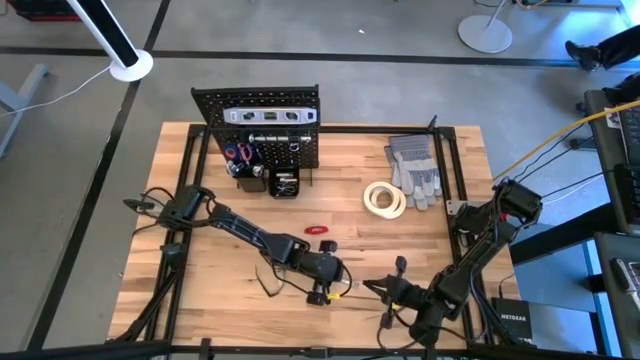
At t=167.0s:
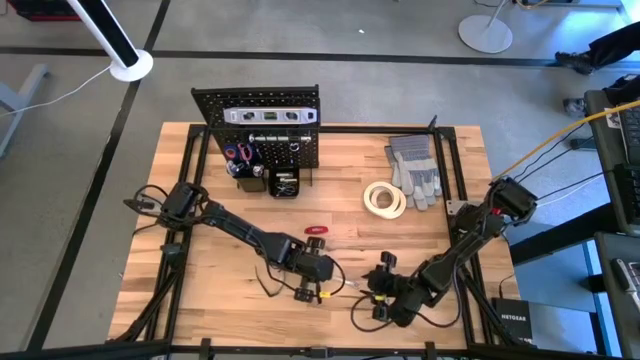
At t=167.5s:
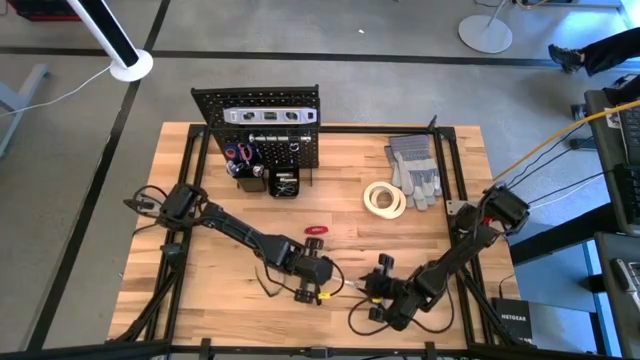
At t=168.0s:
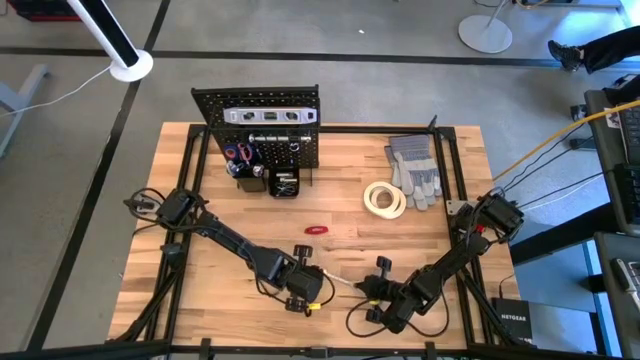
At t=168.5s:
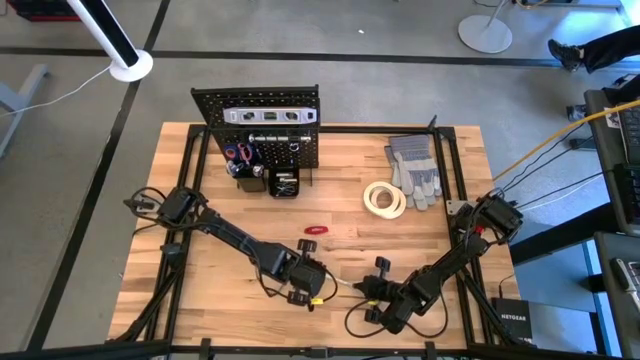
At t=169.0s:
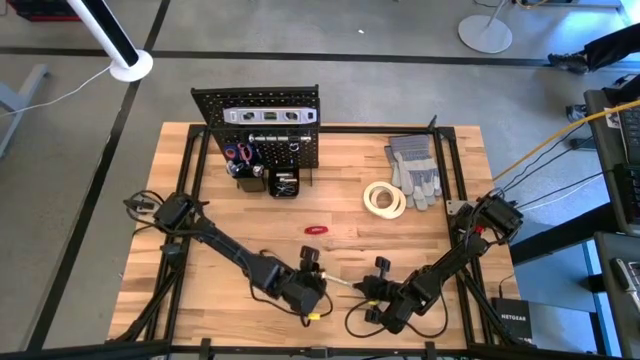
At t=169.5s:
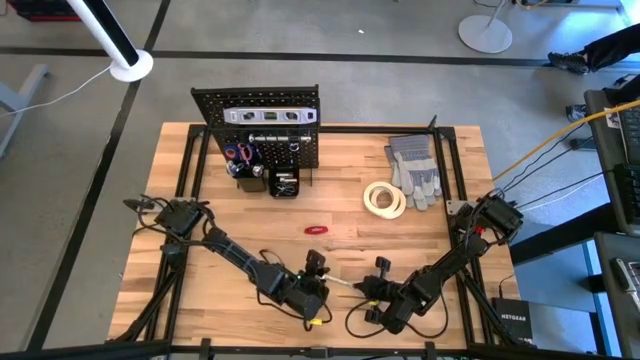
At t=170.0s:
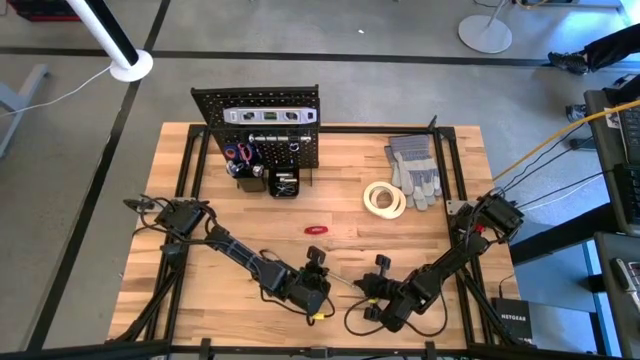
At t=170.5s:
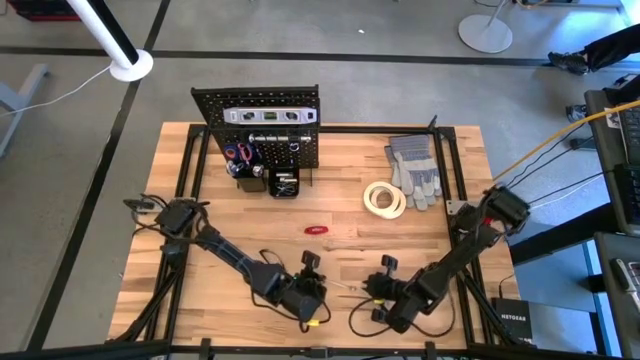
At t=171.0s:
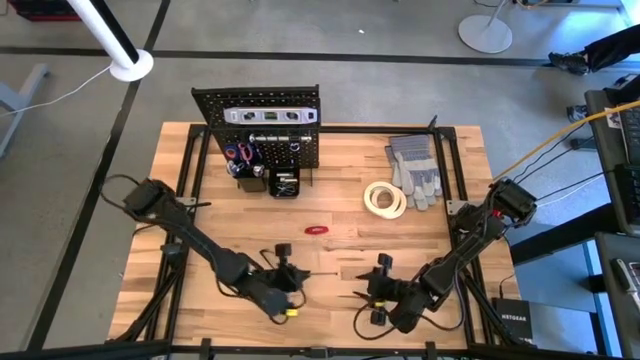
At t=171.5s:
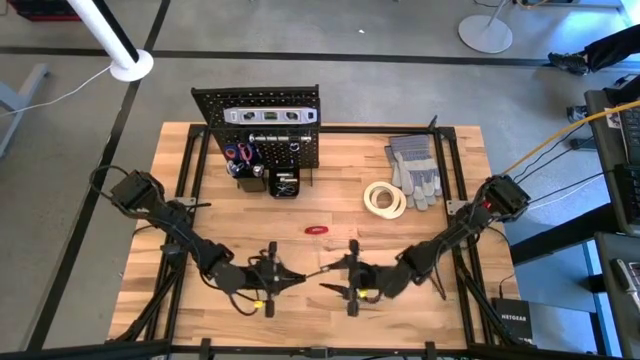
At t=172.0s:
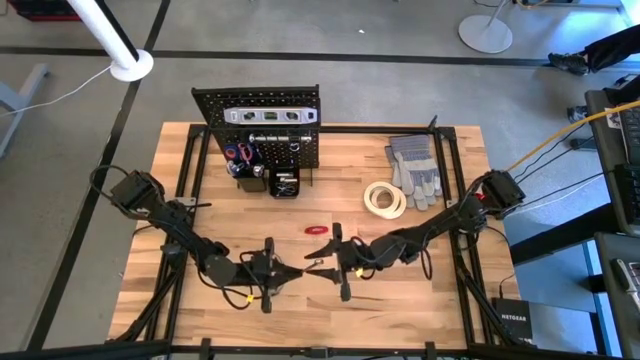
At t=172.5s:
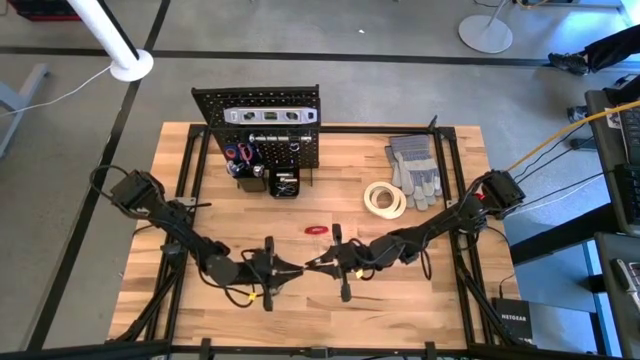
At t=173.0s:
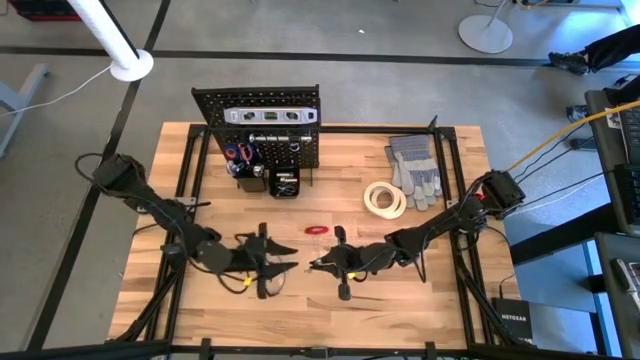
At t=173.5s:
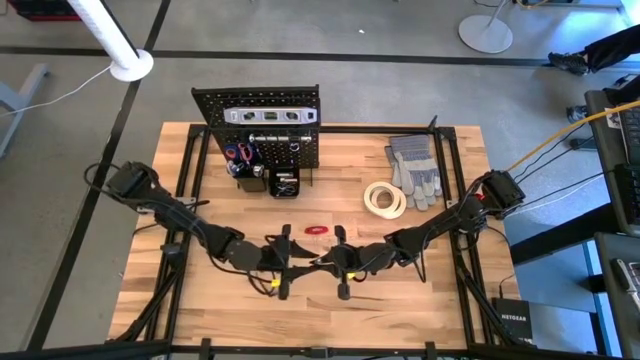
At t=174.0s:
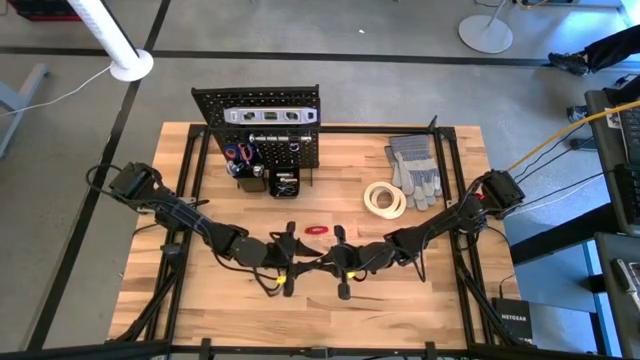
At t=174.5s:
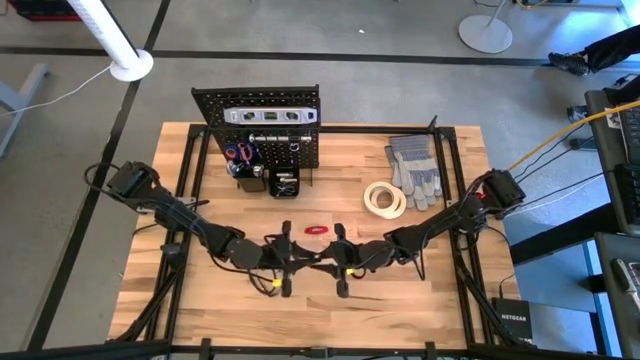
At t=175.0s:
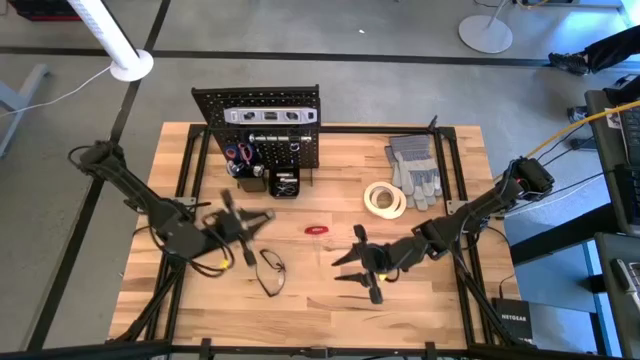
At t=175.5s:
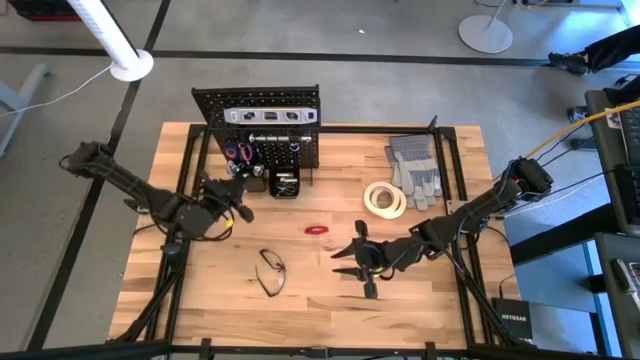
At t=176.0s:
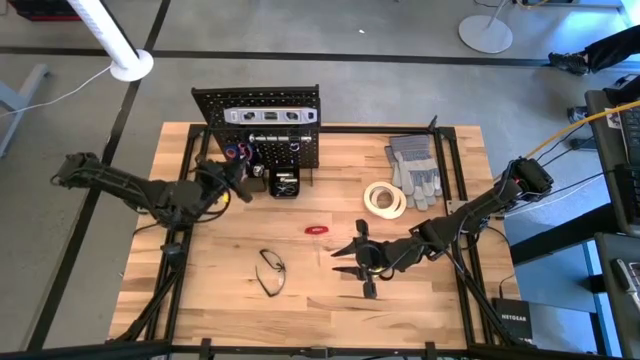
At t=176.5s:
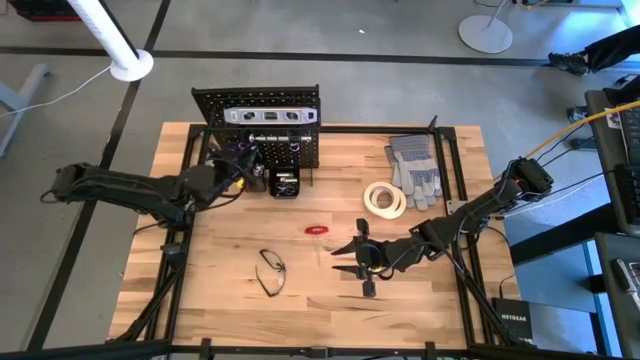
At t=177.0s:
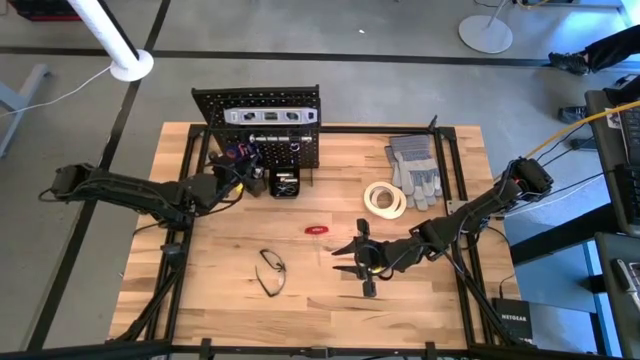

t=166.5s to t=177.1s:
Task: Hang tools onto peg board
Put the wrench into the left pegboard organizer bin

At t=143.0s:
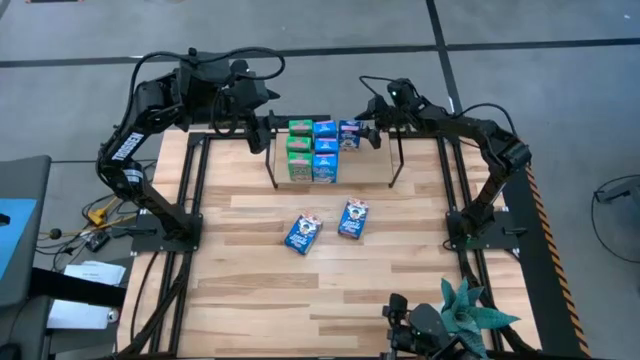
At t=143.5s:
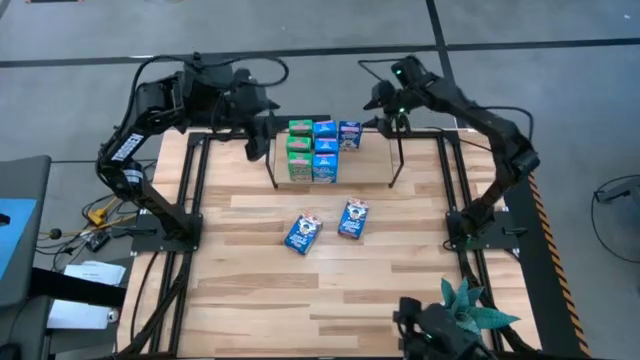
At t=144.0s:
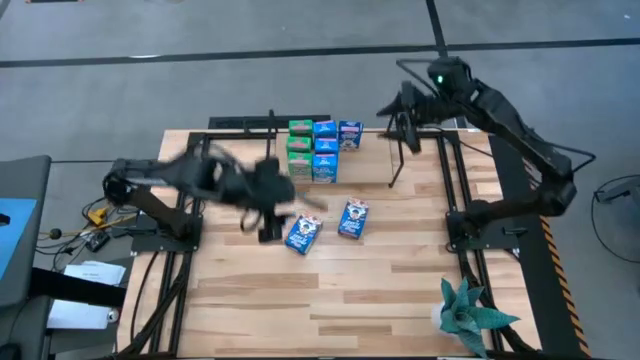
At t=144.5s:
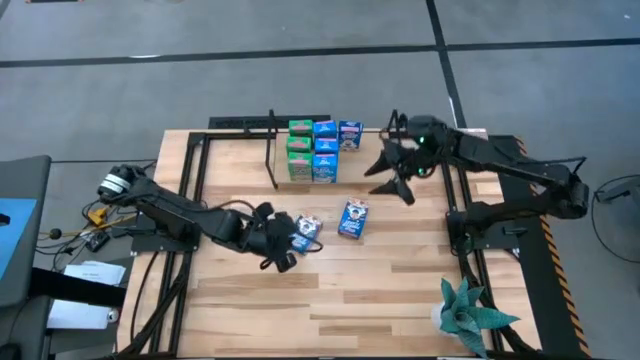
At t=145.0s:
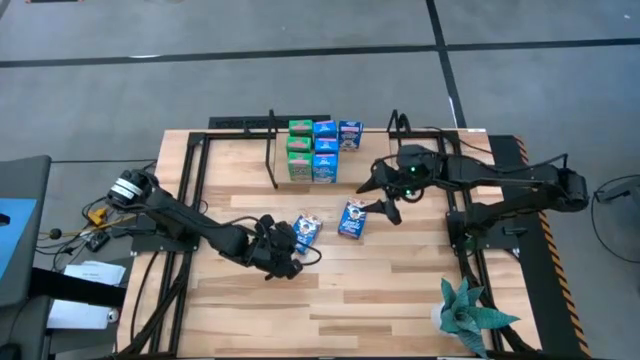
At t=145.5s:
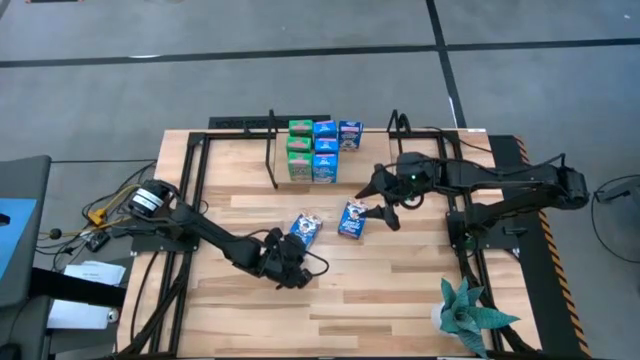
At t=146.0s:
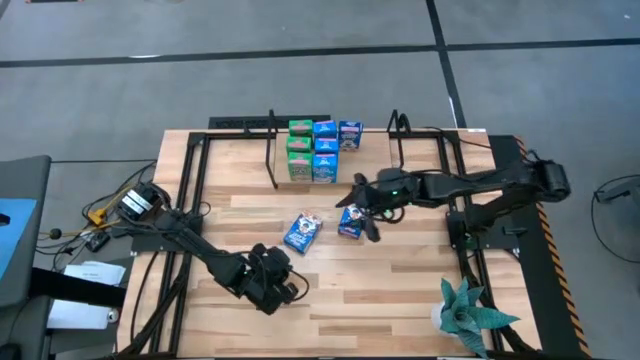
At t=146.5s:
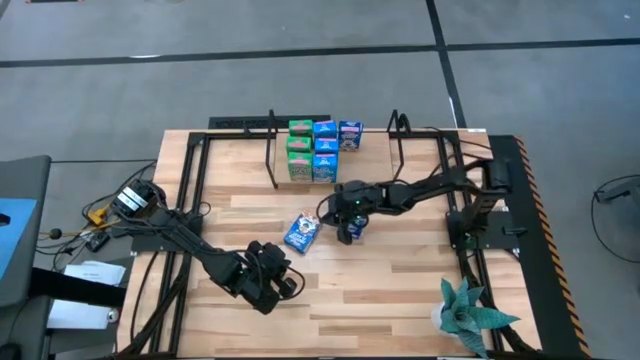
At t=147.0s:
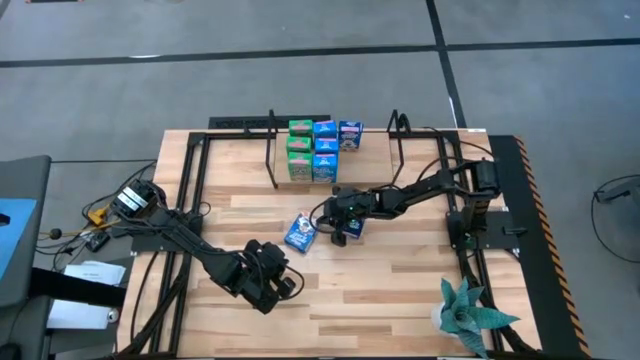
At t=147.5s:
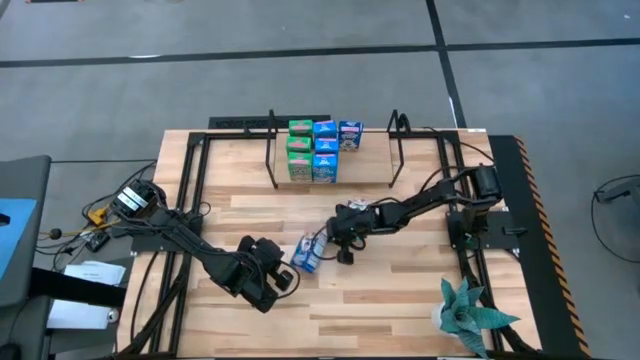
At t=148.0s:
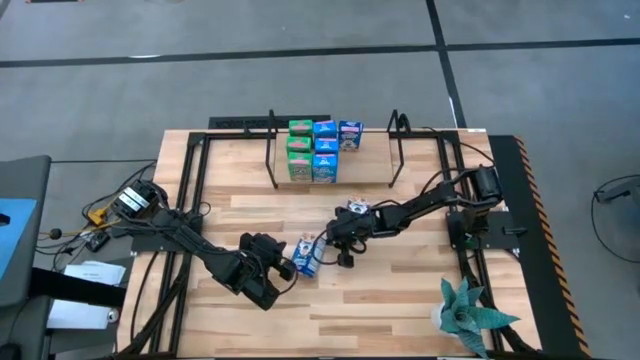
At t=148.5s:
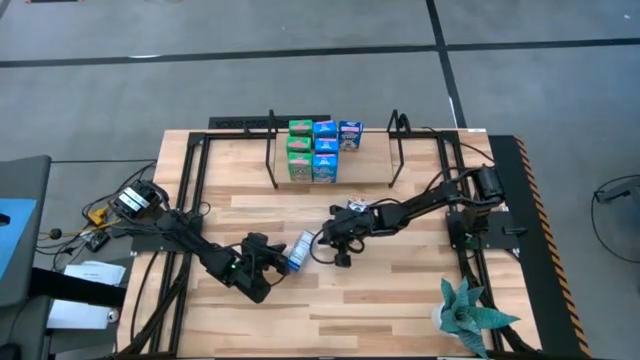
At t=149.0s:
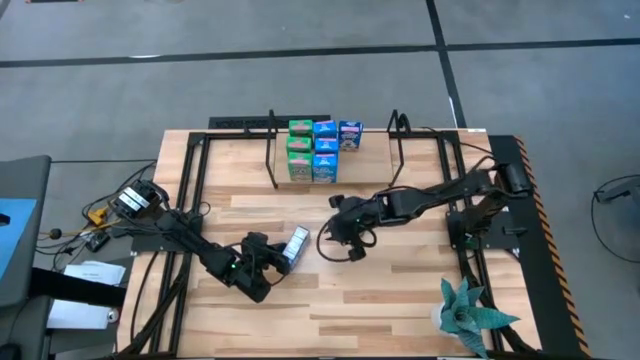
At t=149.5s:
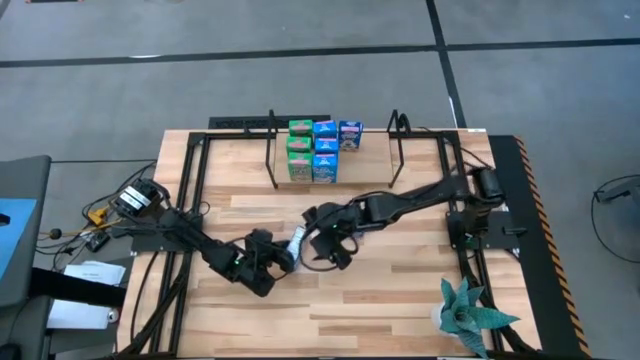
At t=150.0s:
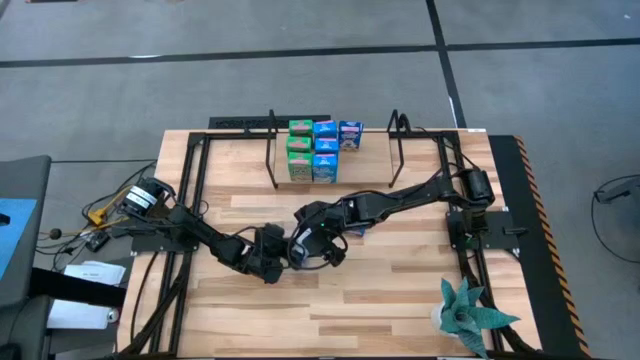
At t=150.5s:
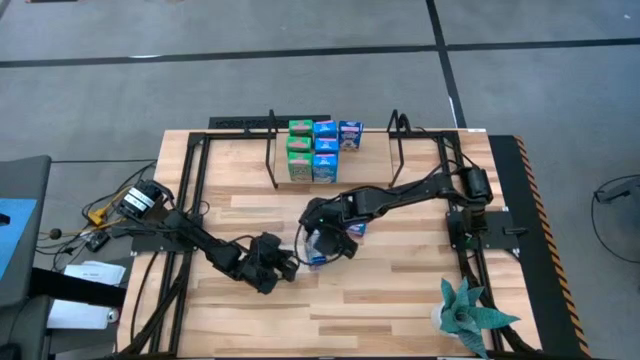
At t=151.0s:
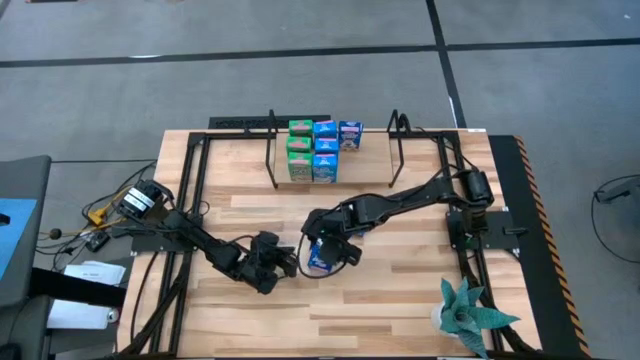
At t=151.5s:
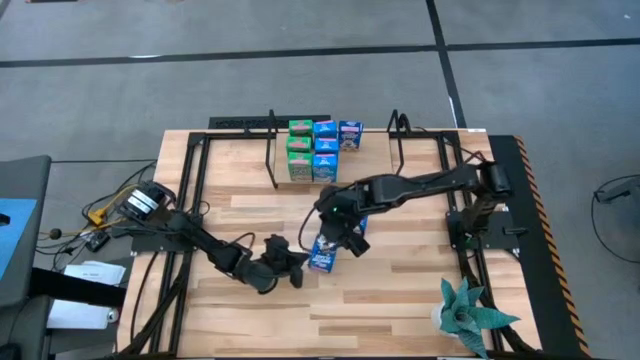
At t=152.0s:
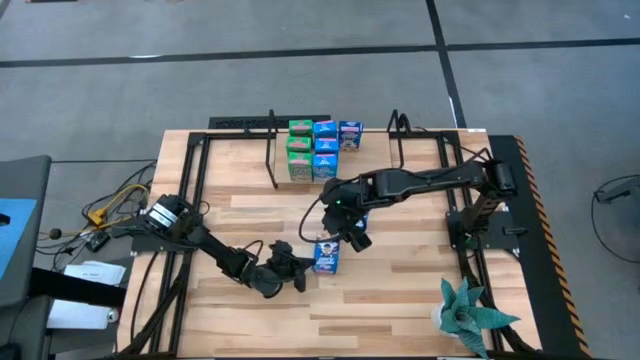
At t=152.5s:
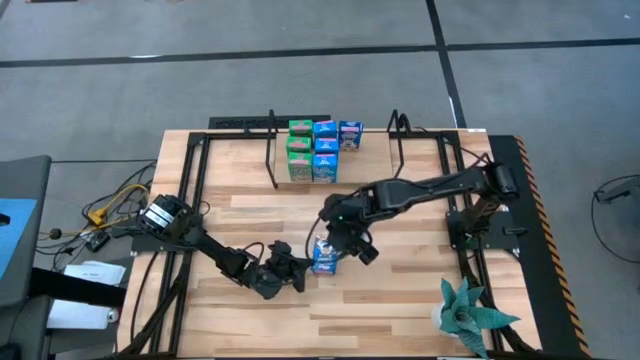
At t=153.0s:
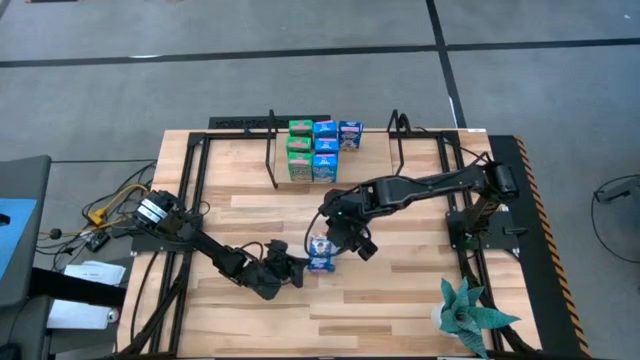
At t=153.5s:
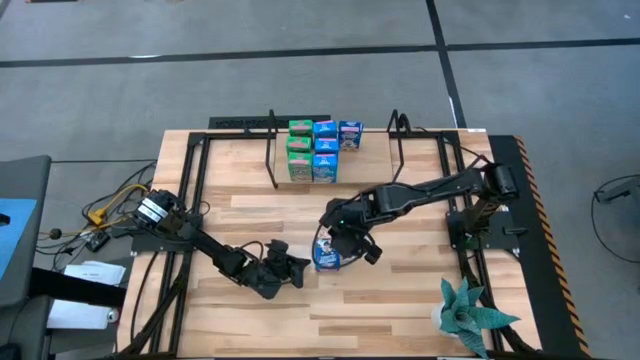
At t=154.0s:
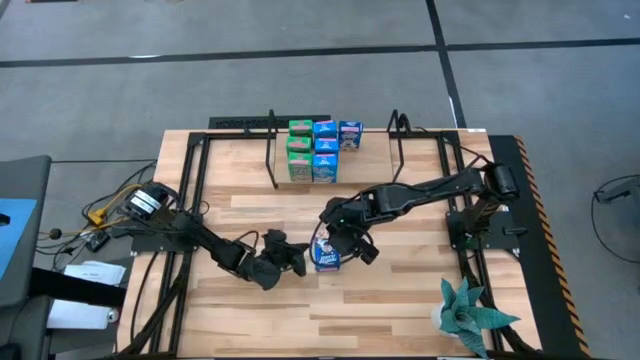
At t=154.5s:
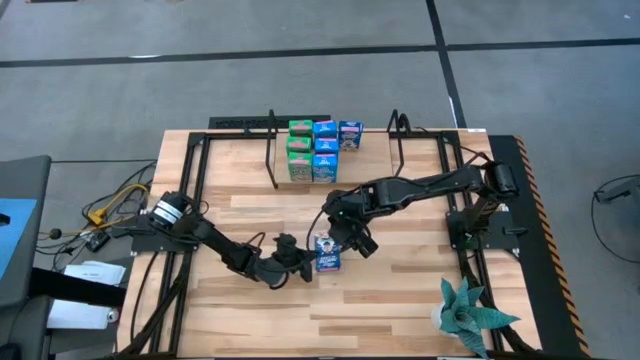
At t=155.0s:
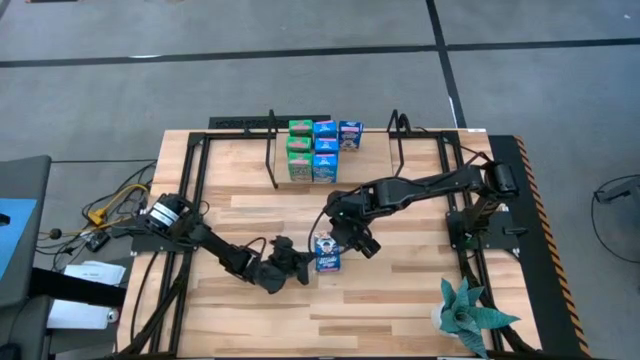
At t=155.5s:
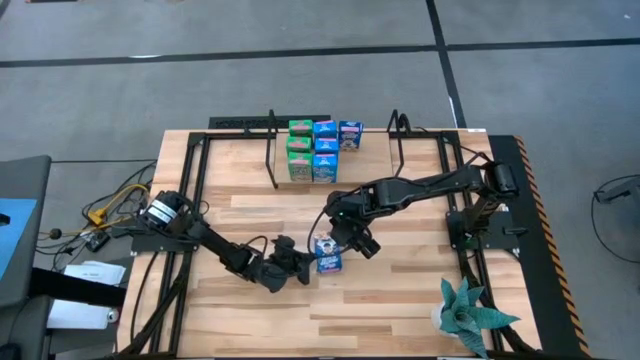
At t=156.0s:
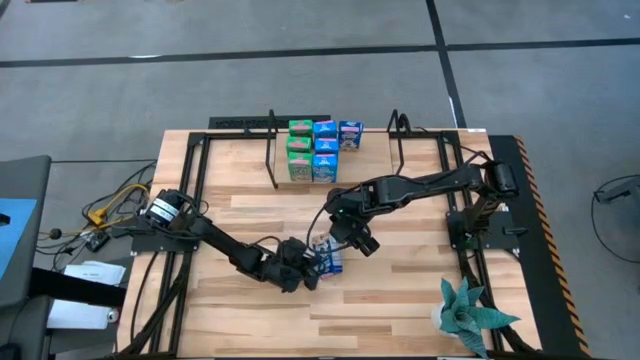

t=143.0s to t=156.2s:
Task: Stack cereal on shelf
Put the left blue cereal box on the shelf aligned with the blue cereal box
